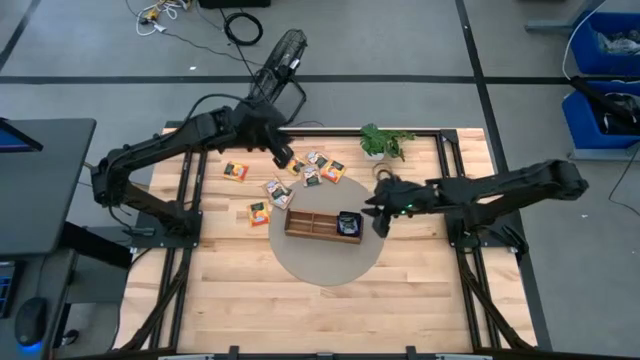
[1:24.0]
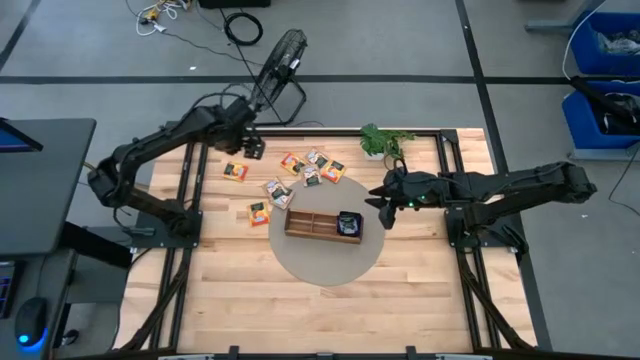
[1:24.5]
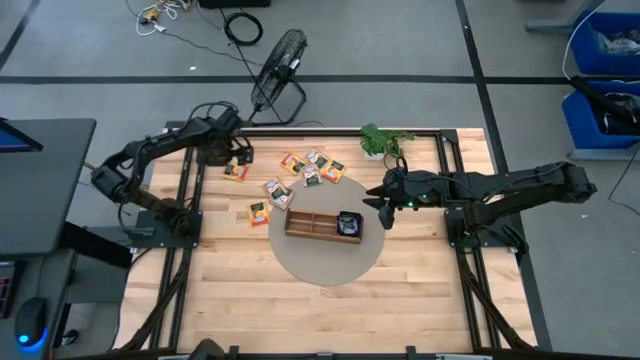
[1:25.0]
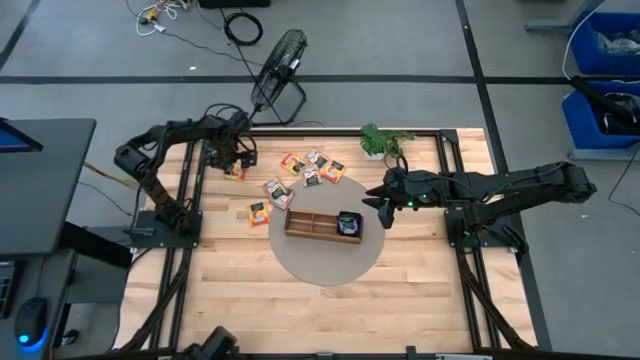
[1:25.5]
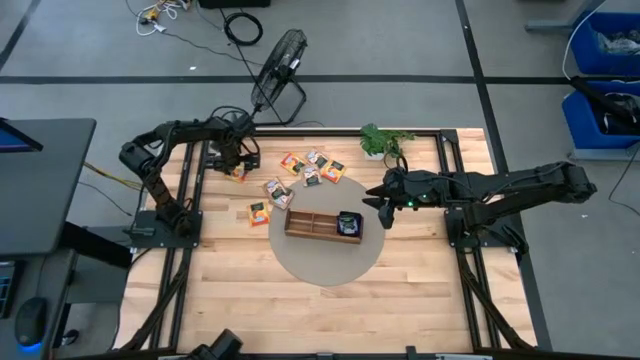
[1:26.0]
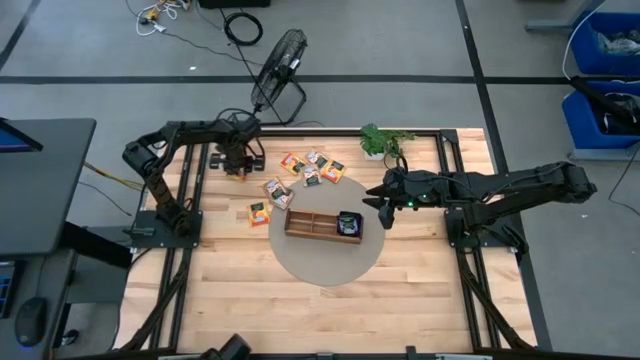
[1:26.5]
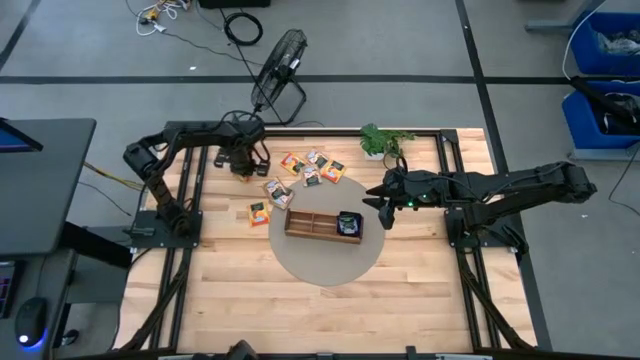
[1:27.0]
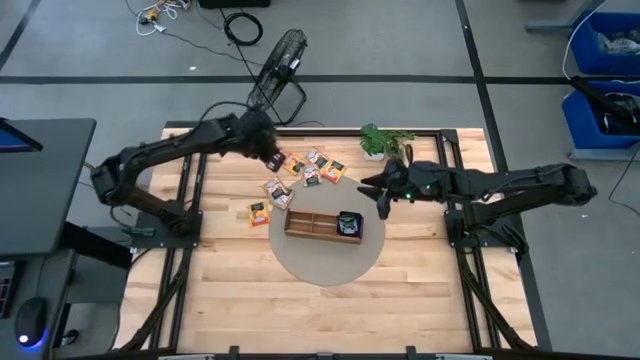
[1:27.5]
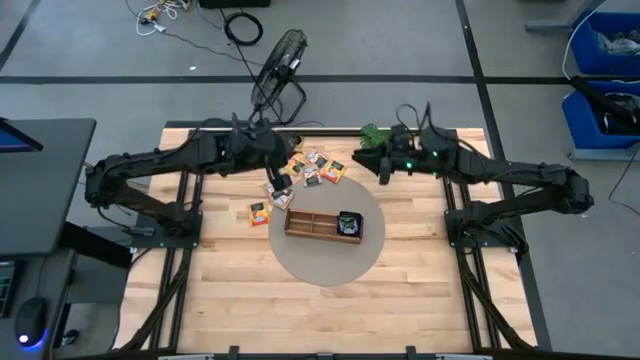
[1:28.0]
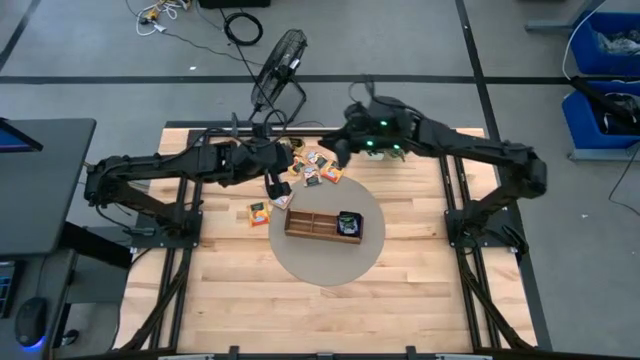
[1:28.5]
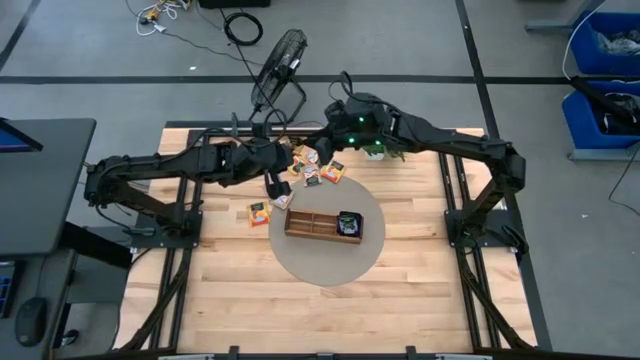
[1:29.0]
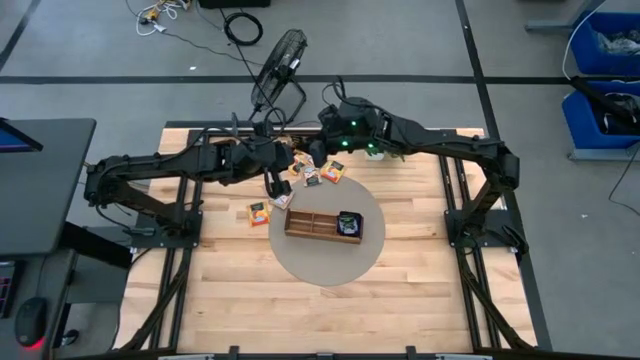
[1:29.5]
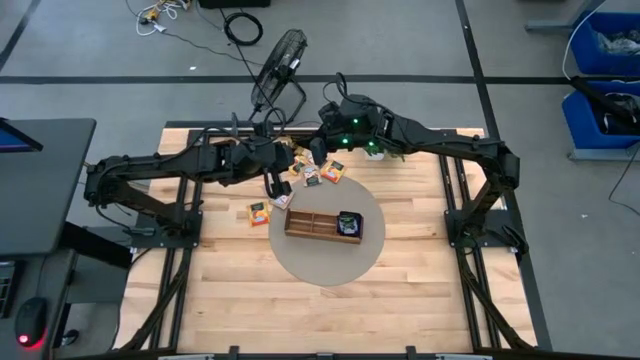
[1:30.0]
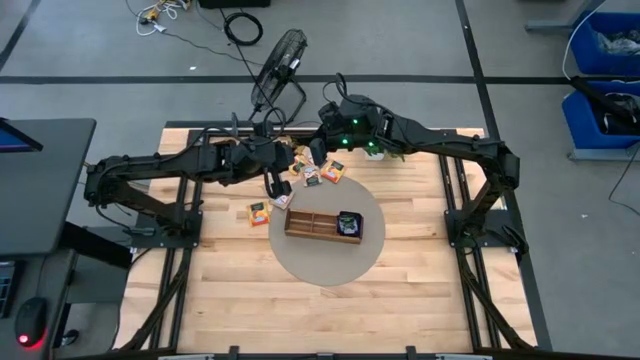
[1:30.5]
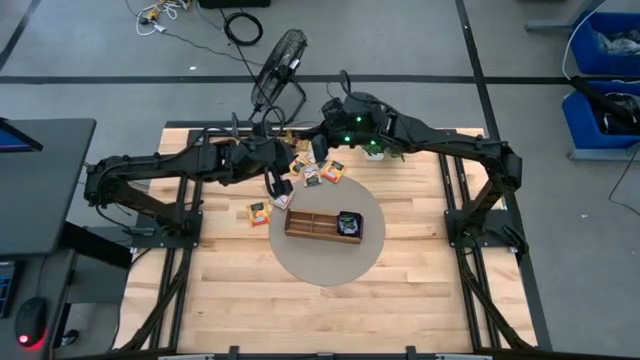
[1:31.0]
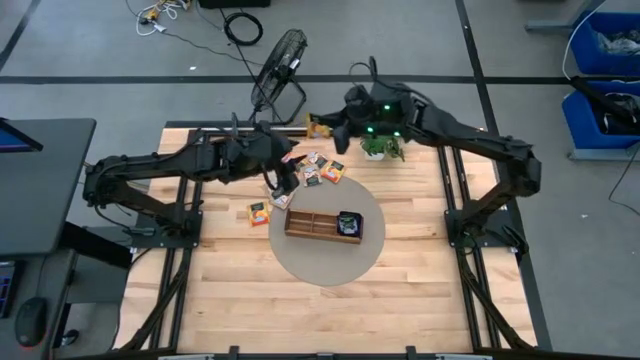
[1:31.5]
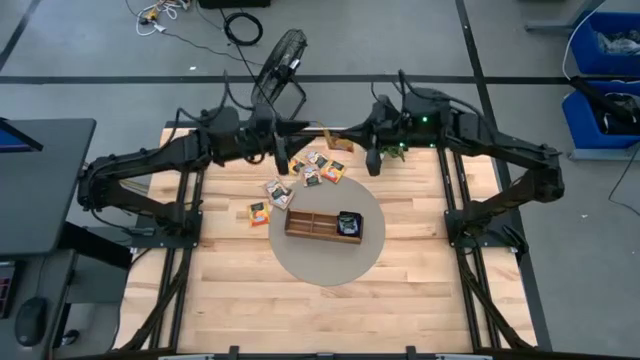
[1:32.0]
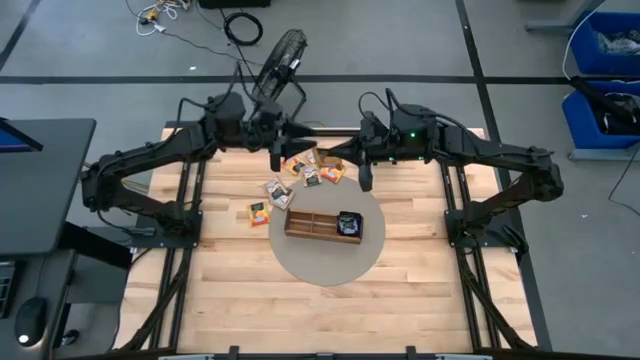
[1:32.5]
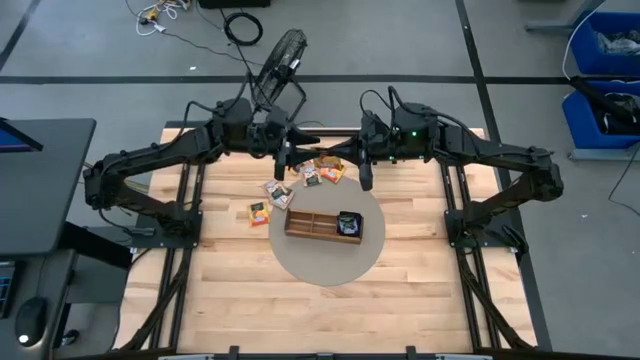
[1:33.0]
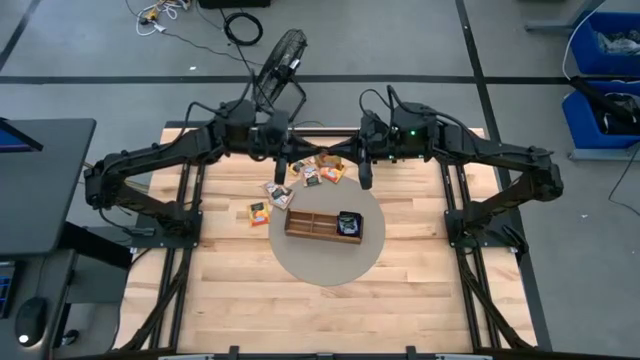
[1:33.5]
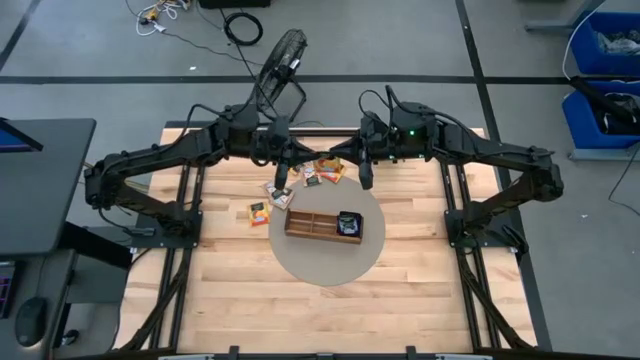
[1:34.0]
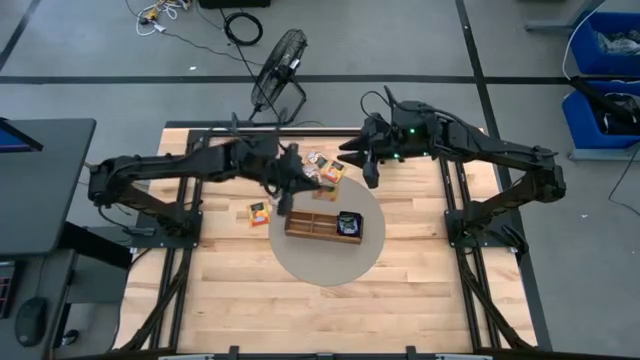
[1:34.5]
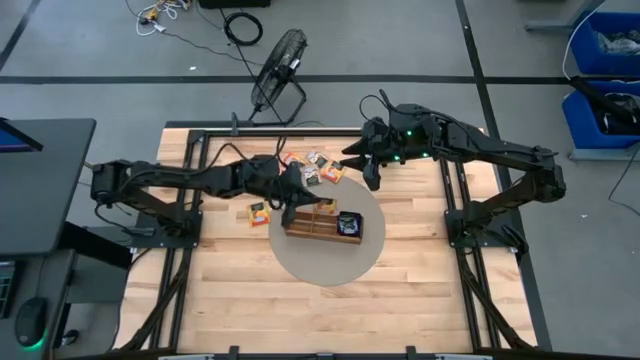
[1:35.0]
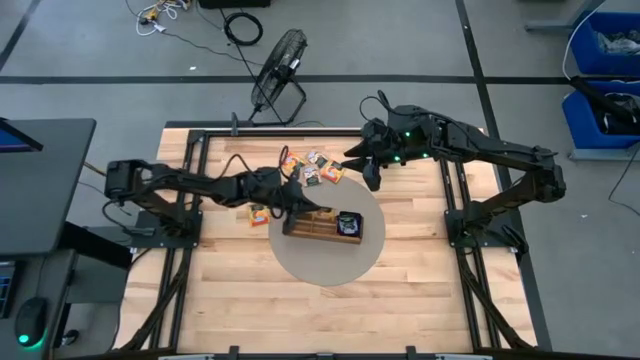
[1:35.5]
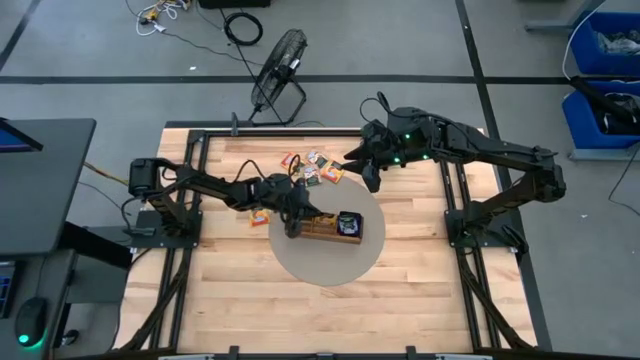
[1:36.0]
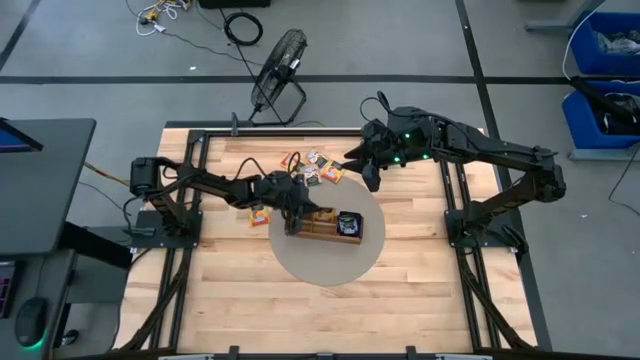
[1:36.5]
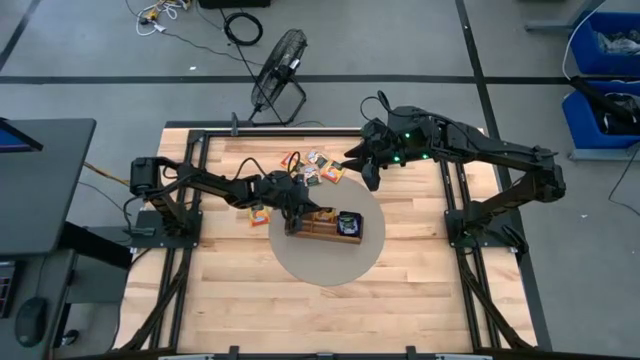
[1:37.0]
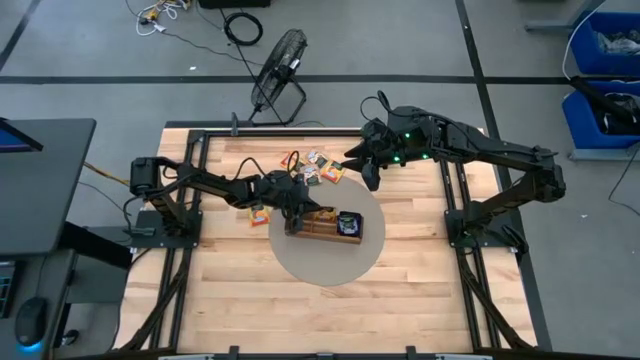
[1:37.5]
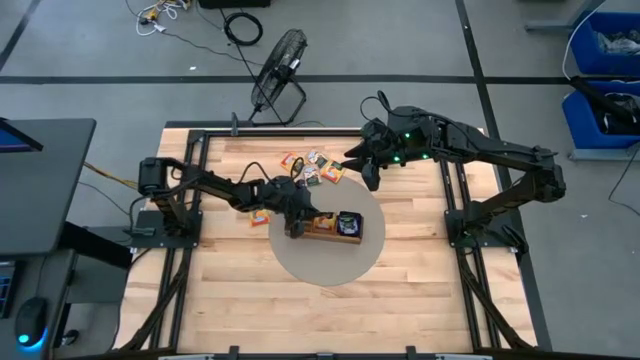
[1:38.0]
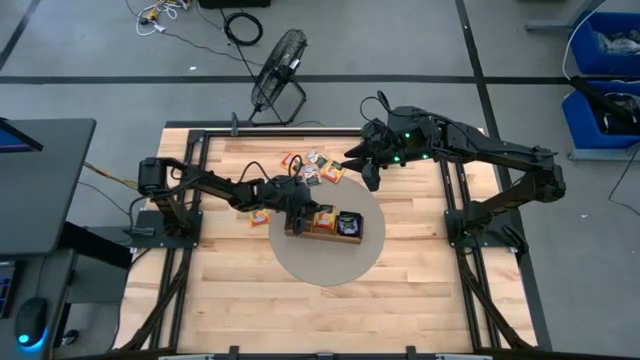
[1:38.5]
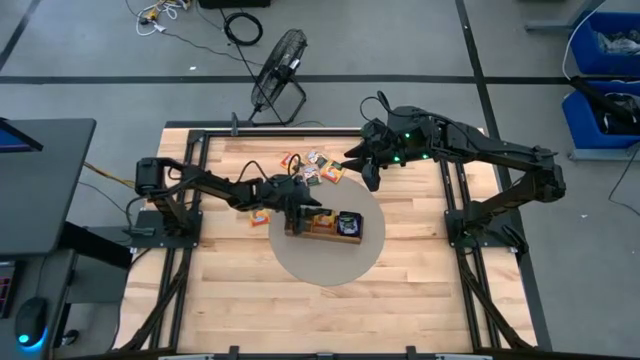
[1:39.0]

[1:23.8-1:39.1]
Task: Pick & Place Tea
Put the yellow tea bag into the middle section of the wooden organizer

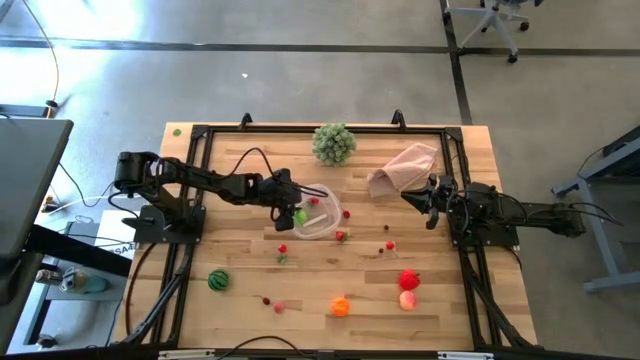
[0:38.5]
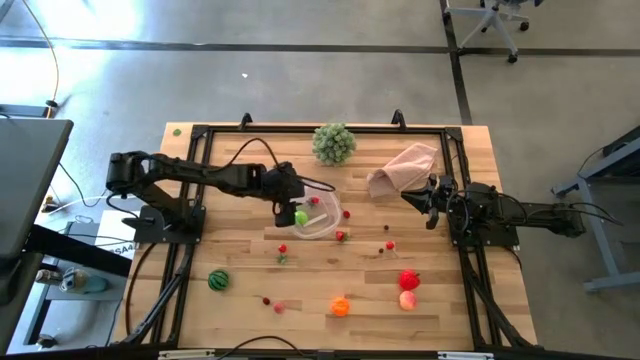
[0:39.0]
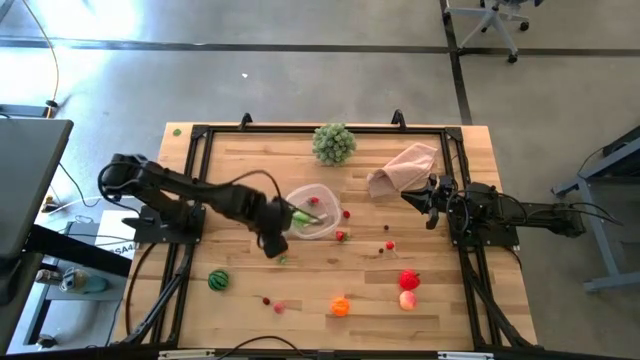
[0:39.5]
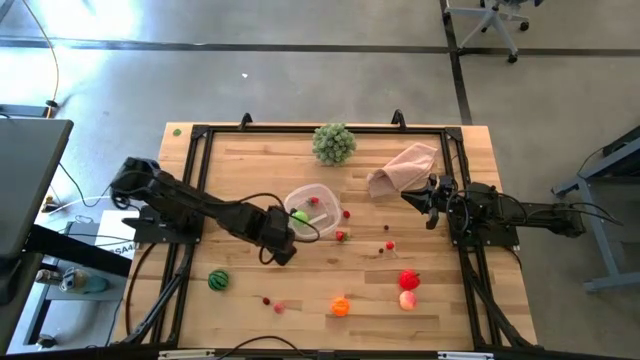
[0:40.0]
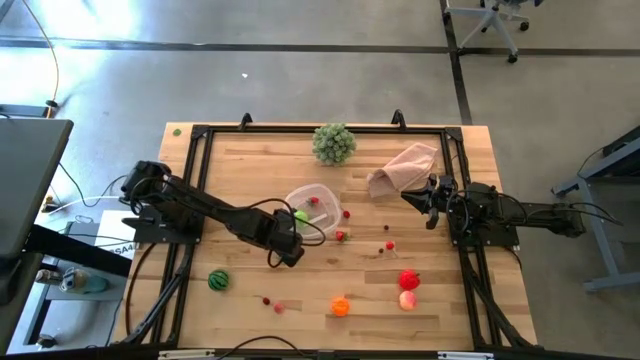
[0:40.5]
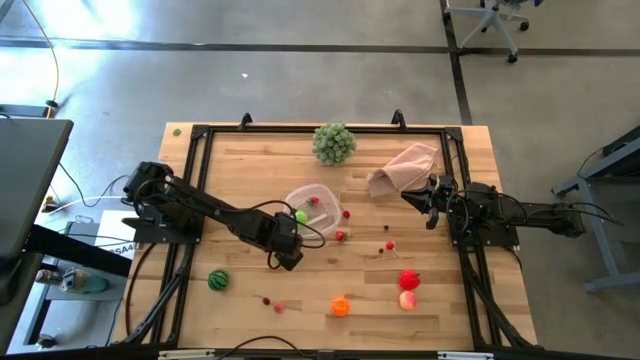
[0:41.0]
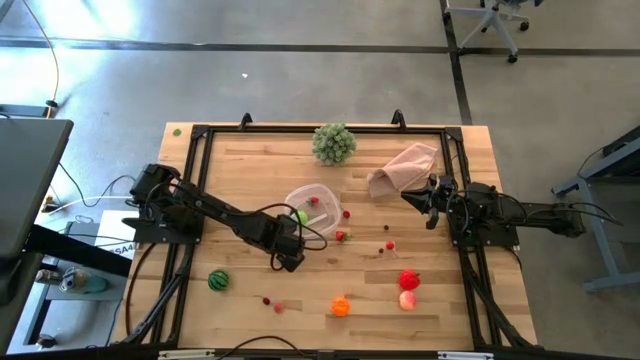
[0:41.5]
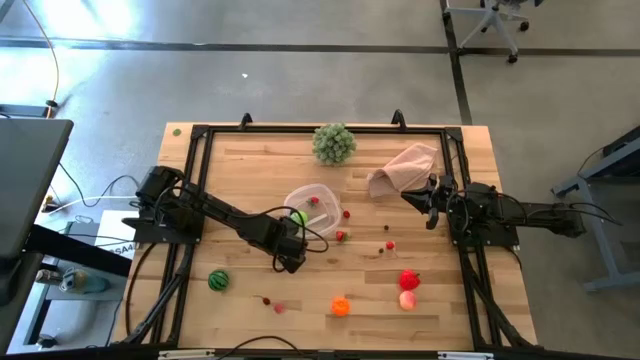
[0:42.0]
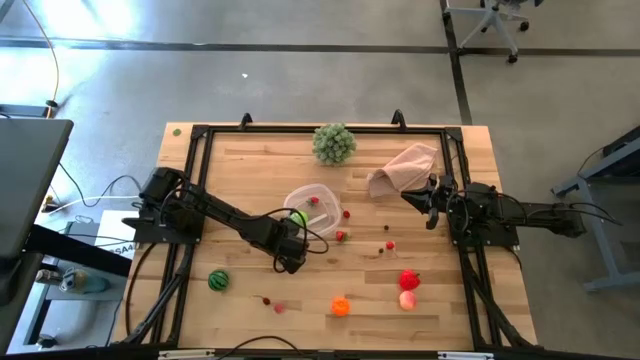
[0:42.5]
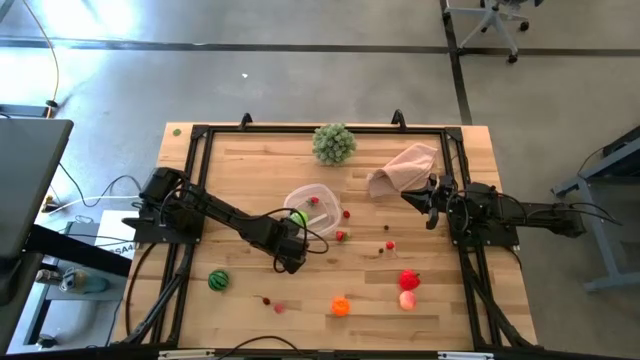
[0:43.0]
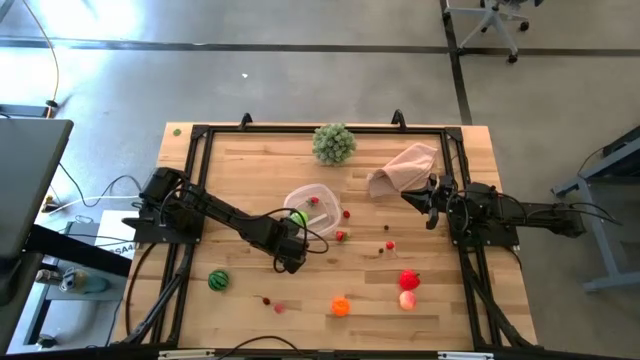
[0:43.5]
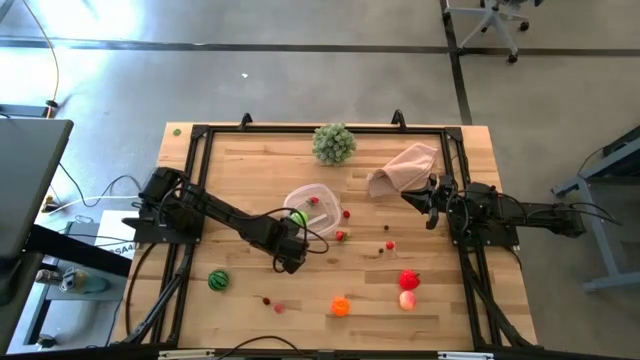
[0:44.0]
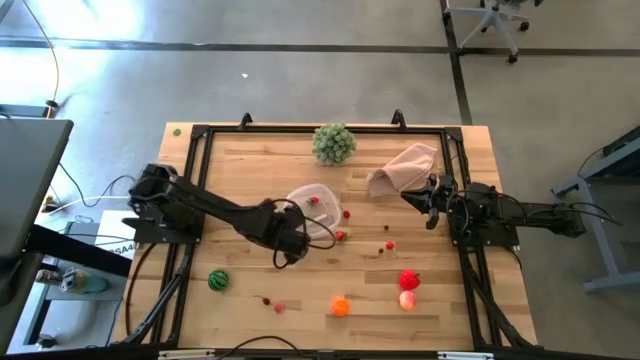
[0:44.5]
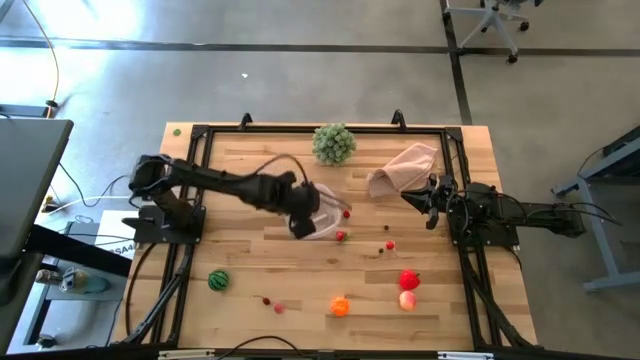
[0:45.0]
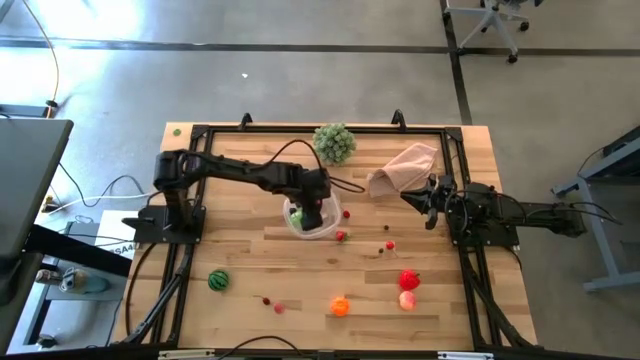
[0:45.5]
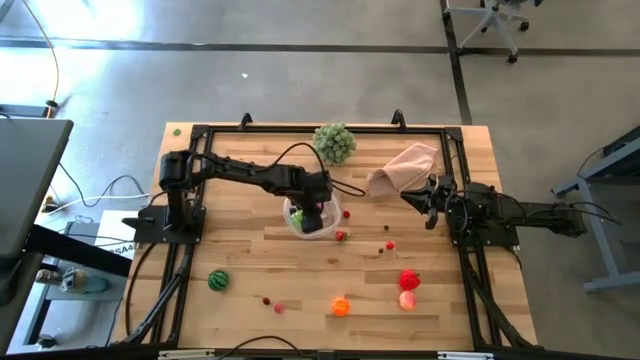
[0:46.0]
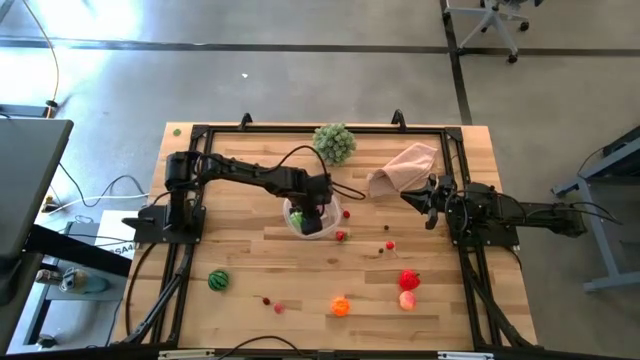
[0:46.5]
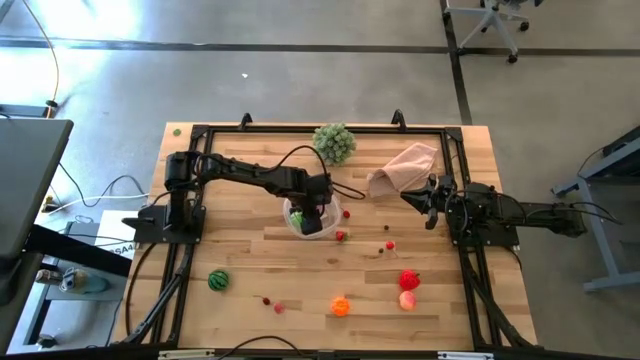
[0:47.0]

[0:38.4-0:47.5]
Task: Pick and placing Produce into tupperware
Put the red cherry into the transparent bin
